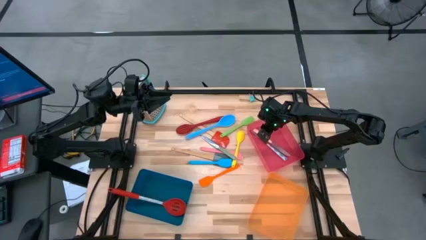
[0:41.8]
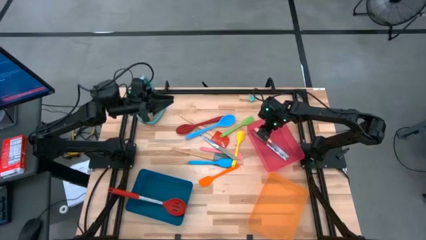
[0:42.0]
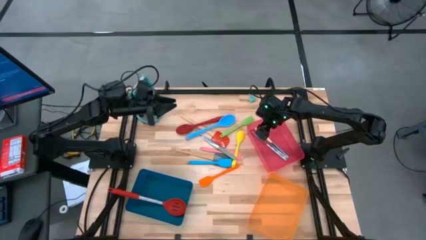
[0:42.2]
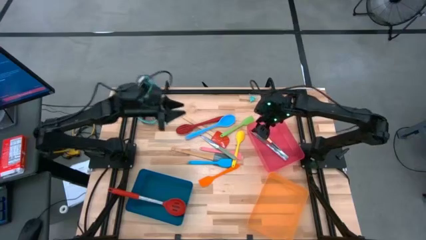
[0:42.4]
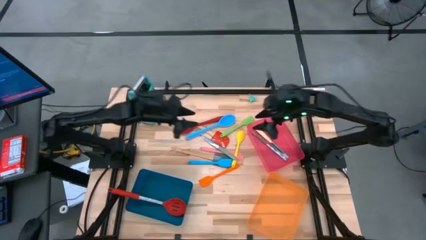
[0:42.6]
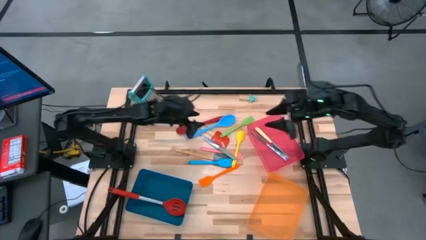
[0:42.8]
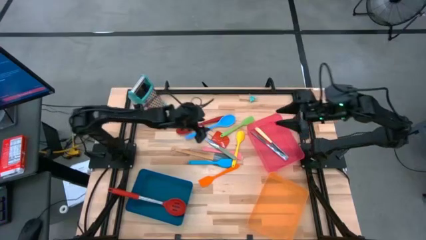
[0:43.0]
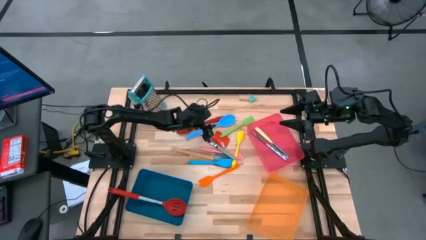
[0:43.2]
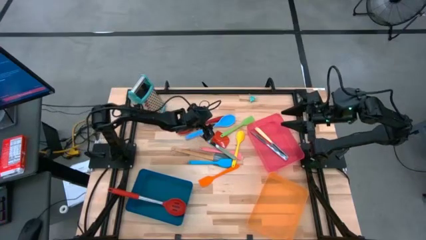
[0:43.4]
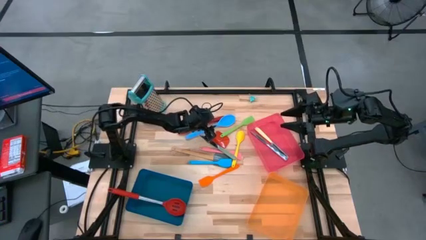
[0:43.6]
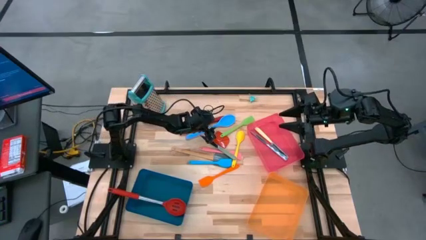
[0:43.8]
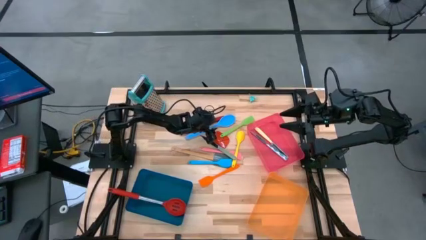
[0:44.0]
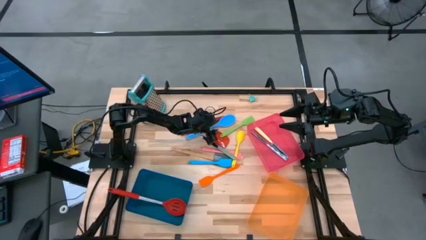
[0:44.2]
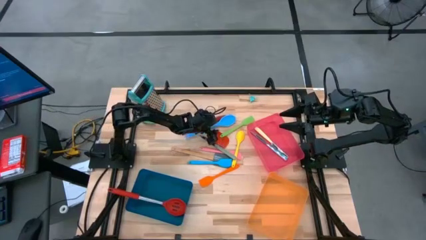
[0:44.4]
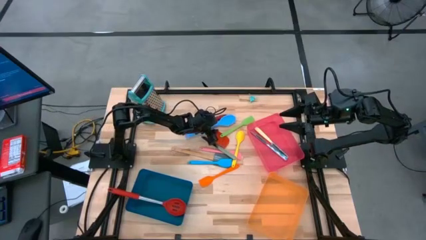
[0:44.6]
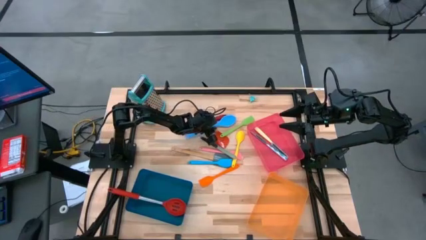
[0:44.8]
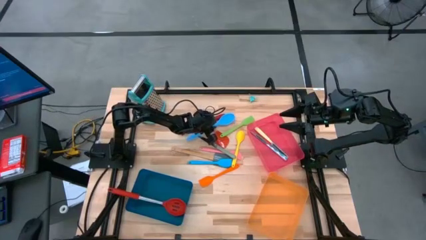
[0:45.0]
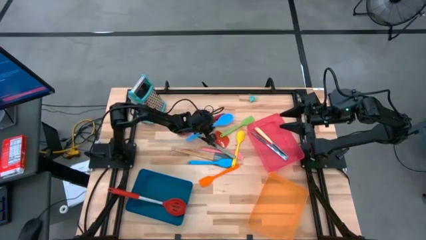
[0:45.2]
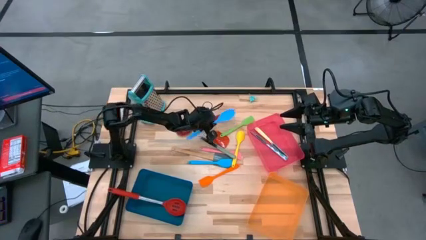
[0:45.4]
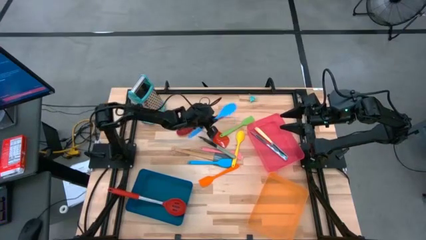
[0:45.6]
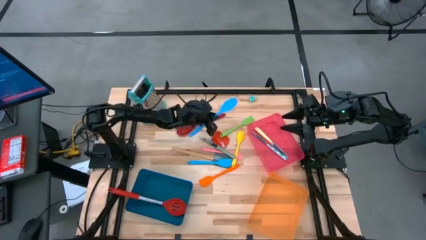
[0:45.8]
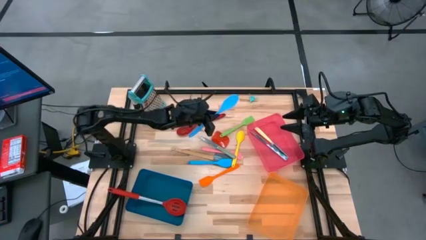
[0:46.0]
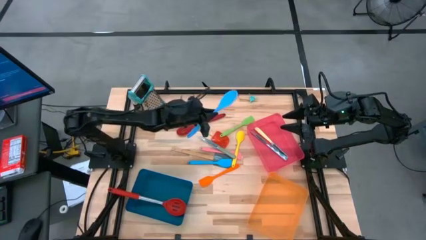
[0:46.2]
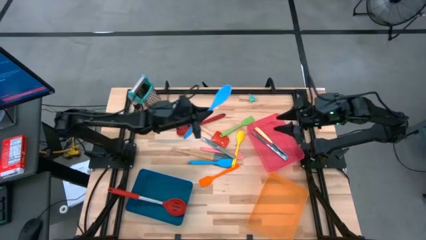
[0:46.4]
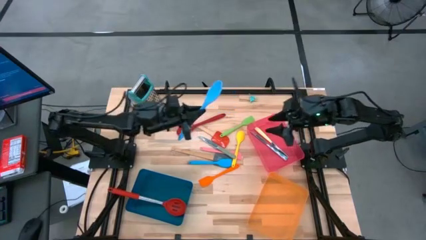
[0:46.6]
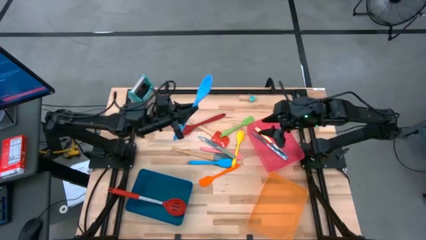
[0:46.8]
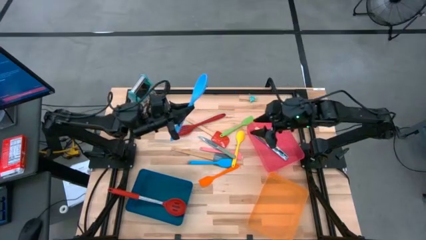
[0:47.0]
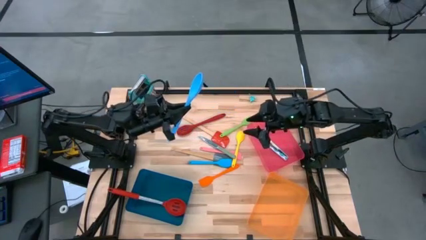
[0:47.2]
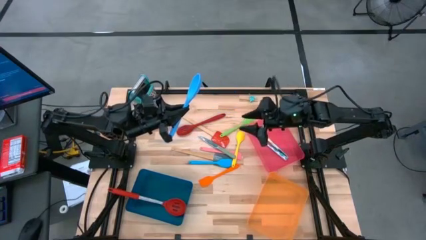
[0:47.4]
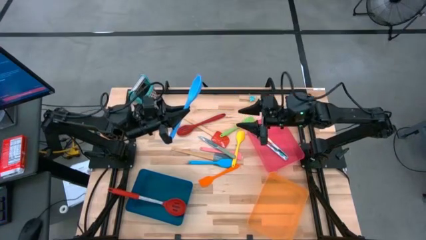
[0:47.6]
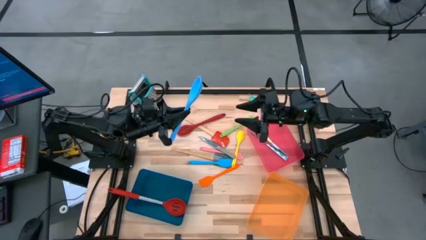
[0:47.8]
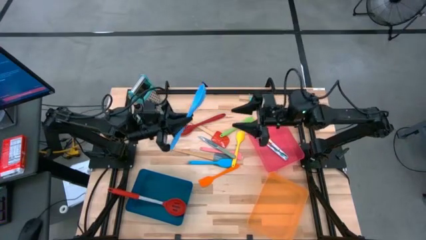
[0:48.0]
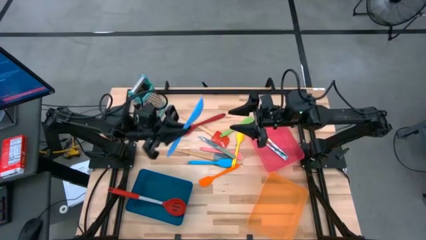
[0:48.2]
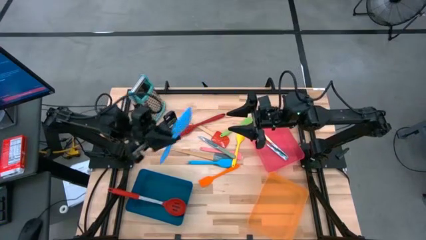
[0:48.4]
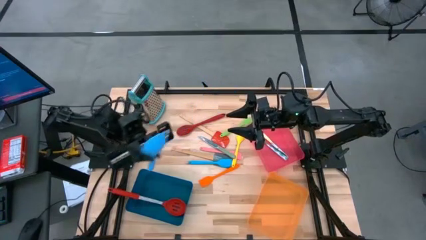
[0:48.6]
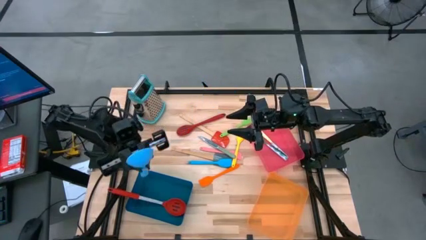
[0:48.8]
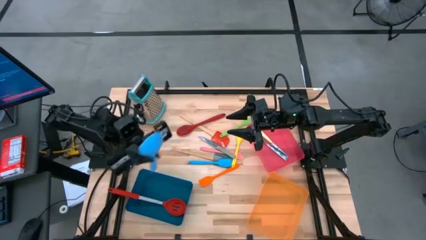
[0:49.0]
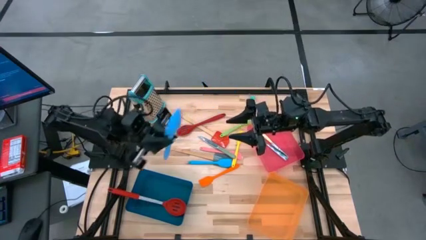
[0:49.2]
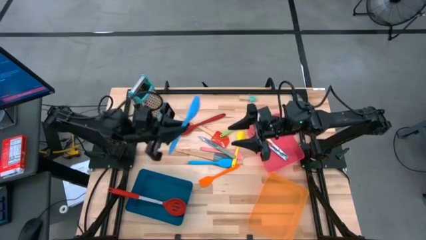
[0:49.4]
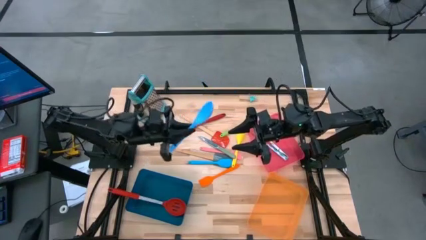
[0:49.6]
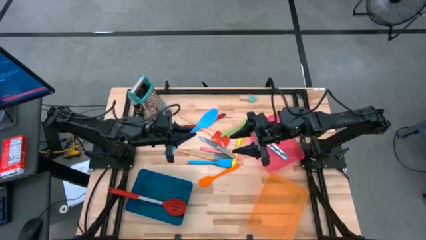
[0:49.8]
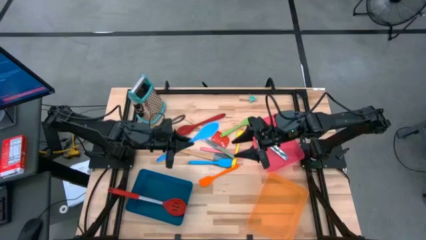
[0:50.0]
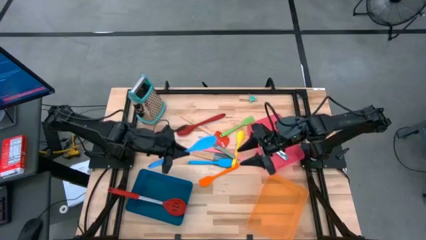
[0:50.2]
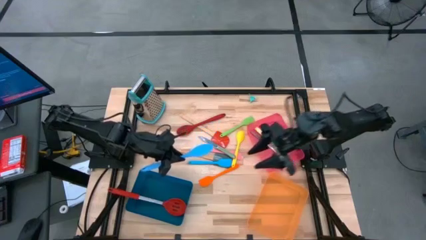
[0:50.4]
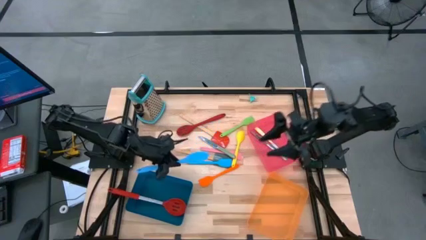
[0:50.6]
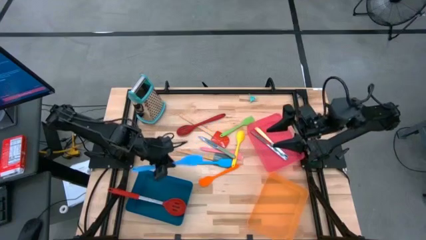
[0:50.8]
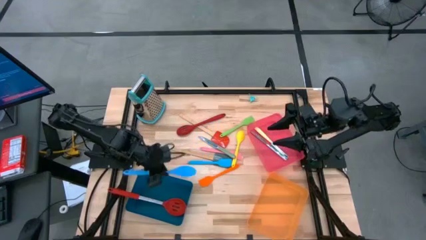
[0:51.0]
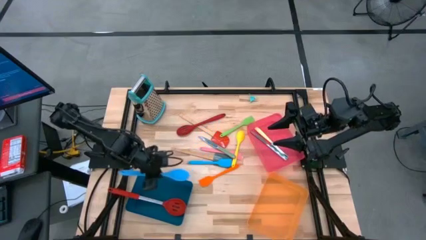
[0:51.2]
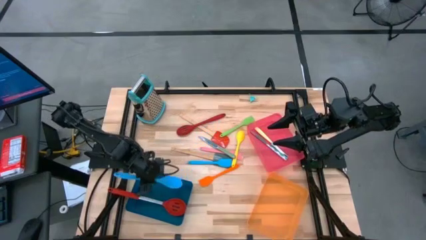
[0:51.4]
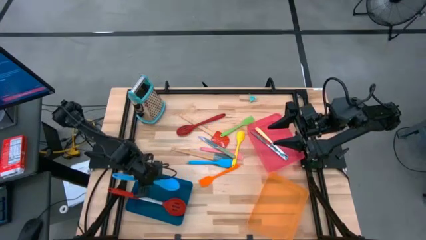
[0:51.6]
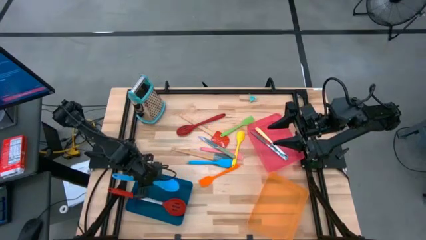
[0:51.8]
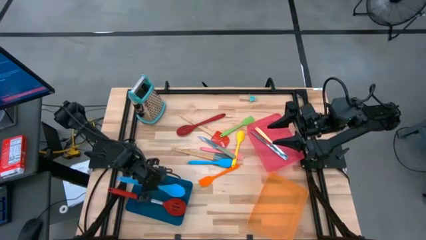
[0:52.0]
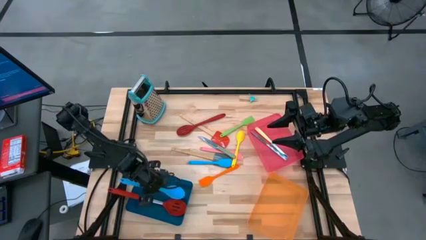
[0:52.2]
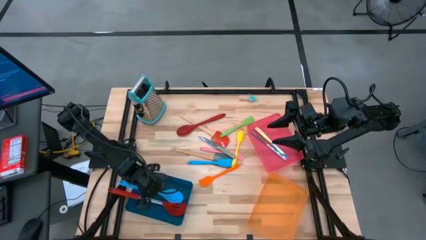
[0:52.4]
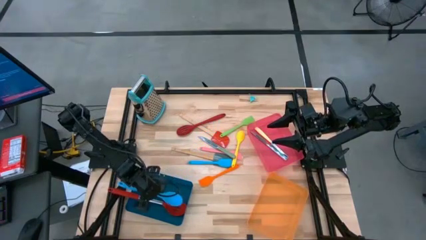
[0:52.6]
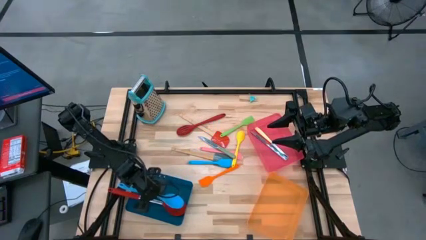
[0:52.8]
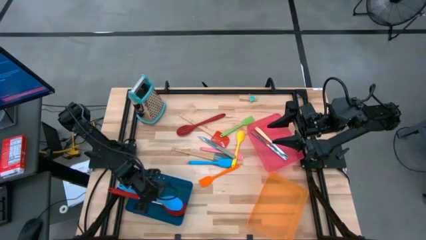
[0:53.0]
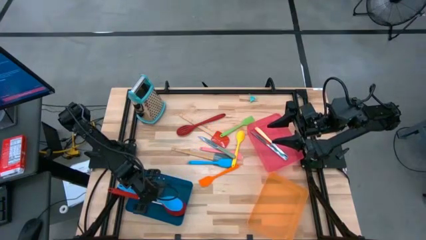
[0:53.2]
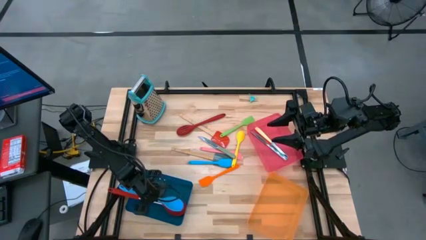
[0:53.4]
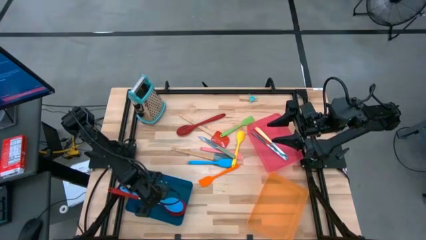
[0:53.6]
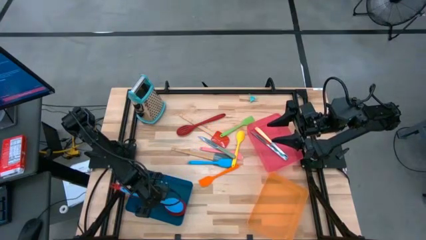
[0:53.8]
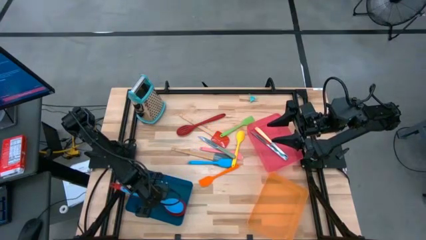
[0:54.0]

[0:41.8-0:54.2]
Task: Pick & Place Kitchen Items
Put the blue serving spoon into the blue bin
